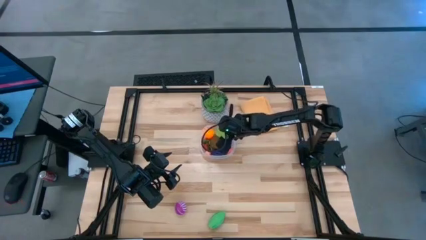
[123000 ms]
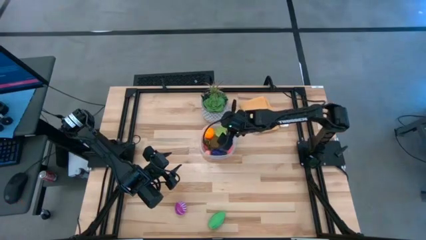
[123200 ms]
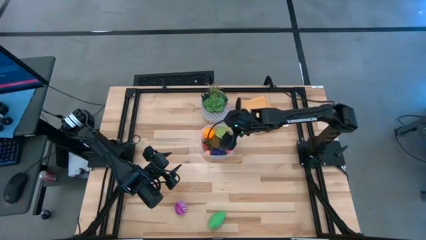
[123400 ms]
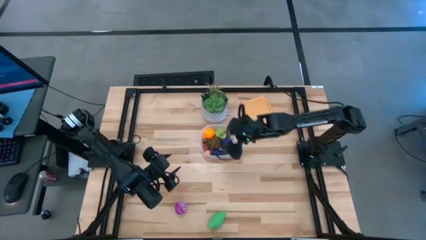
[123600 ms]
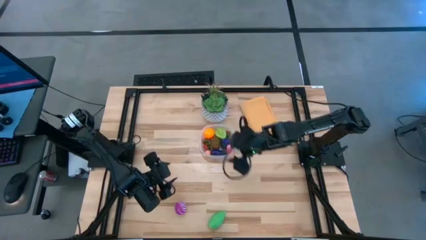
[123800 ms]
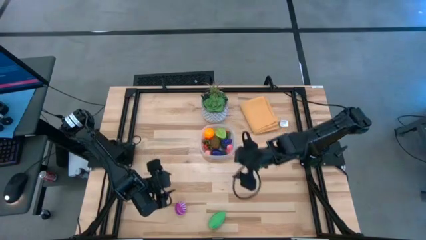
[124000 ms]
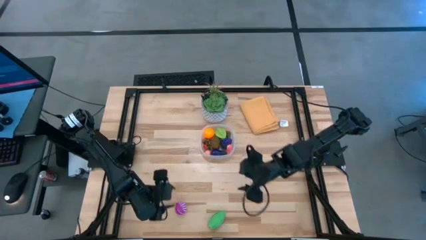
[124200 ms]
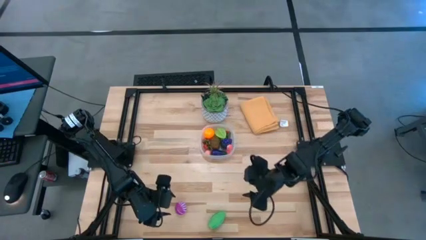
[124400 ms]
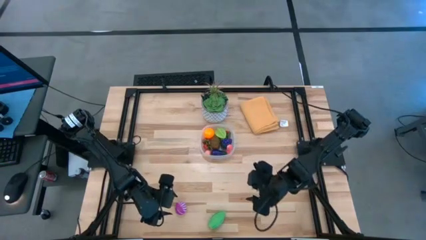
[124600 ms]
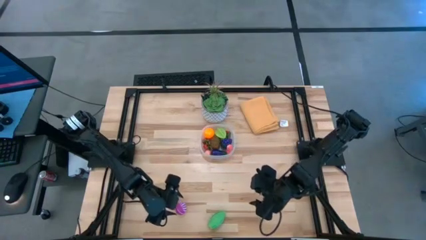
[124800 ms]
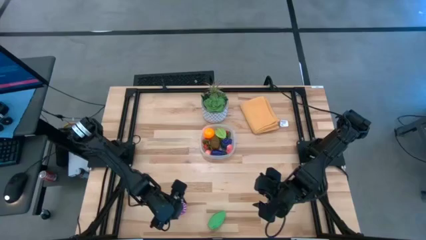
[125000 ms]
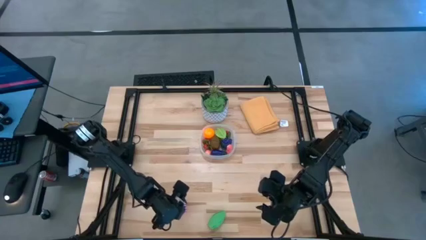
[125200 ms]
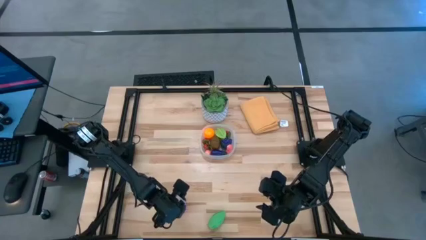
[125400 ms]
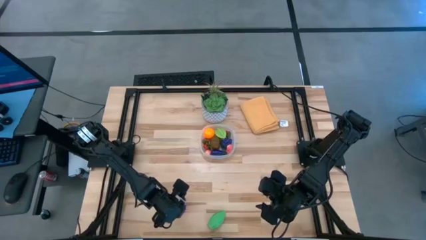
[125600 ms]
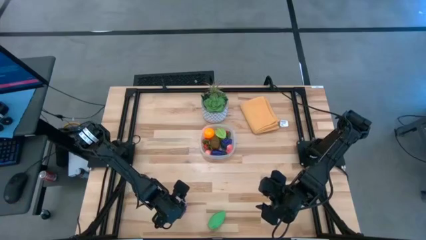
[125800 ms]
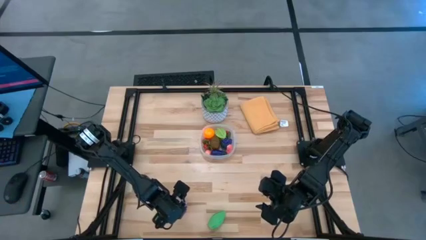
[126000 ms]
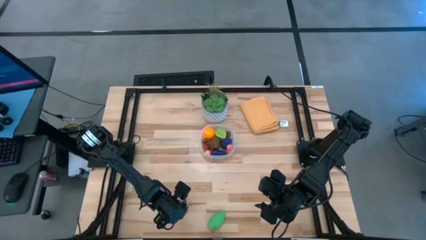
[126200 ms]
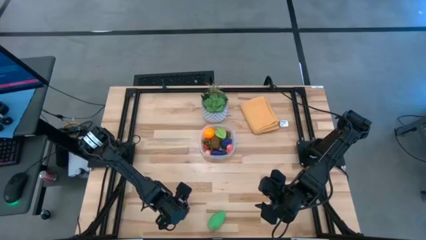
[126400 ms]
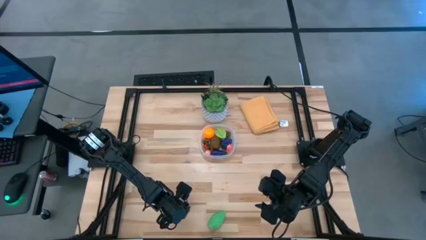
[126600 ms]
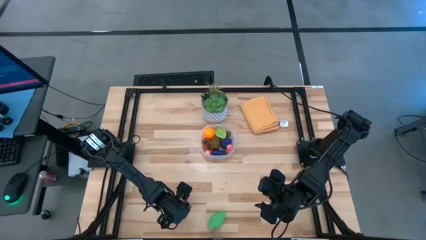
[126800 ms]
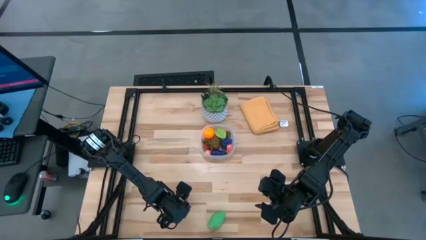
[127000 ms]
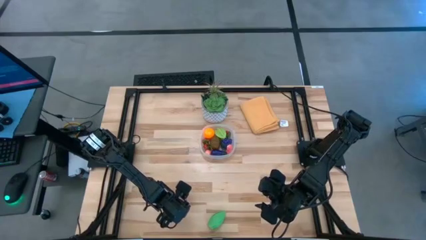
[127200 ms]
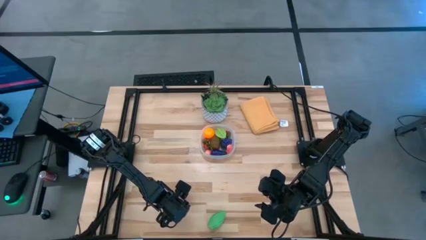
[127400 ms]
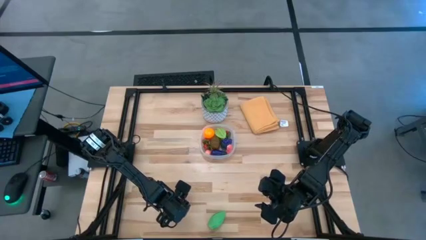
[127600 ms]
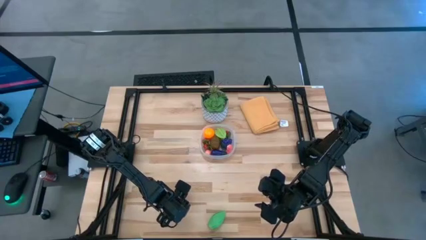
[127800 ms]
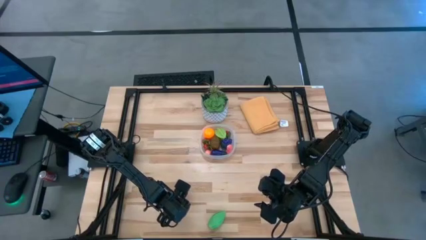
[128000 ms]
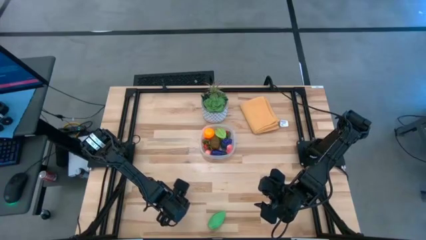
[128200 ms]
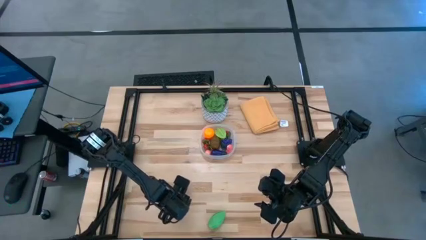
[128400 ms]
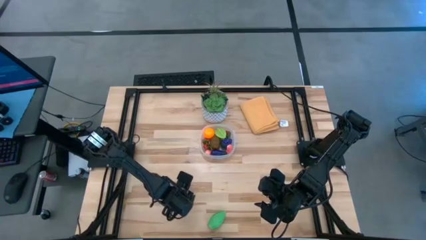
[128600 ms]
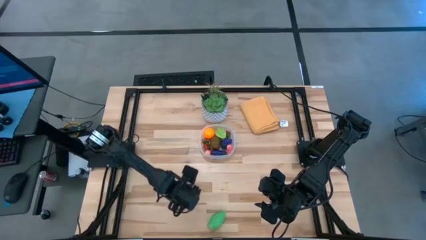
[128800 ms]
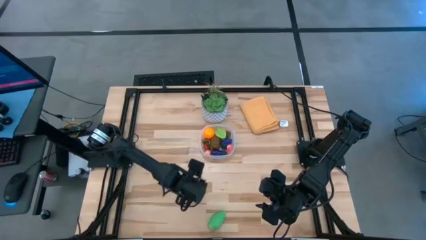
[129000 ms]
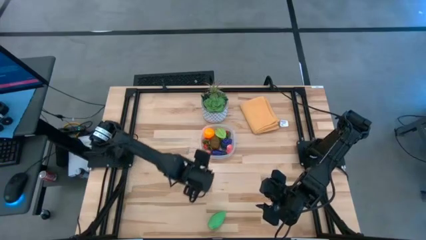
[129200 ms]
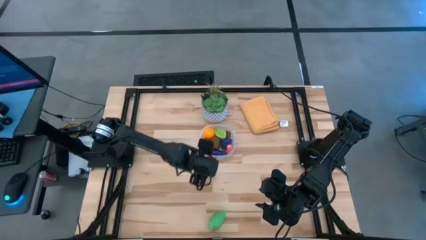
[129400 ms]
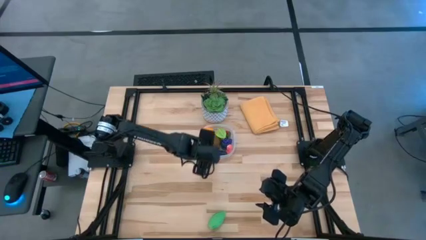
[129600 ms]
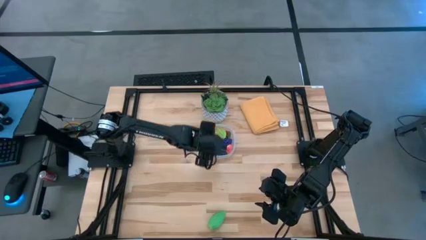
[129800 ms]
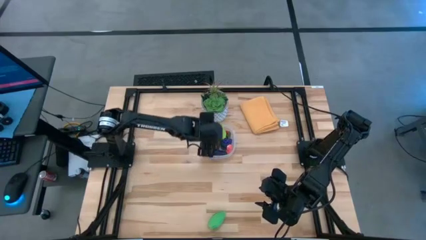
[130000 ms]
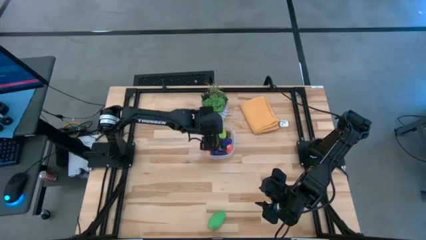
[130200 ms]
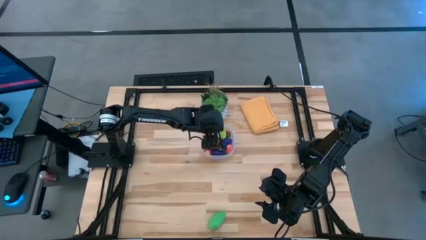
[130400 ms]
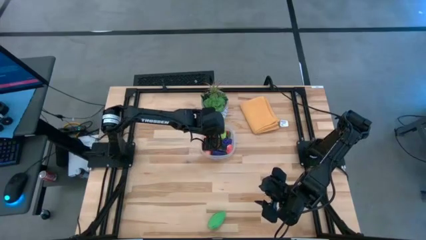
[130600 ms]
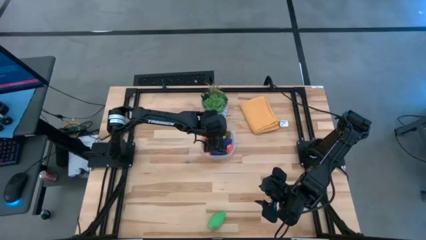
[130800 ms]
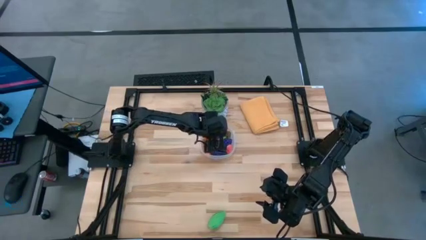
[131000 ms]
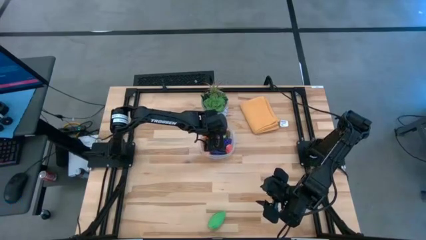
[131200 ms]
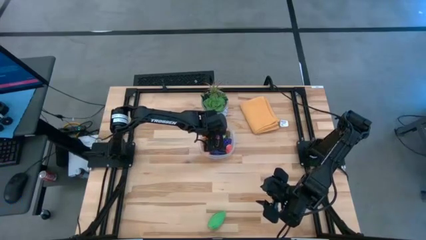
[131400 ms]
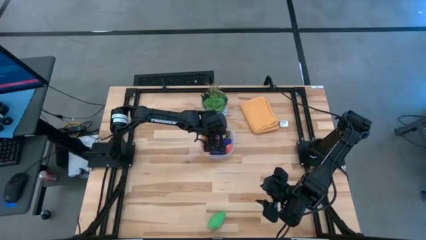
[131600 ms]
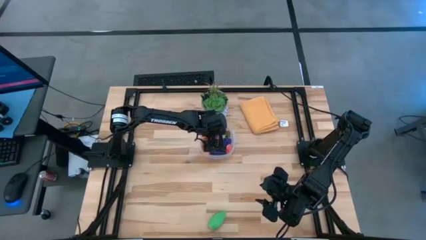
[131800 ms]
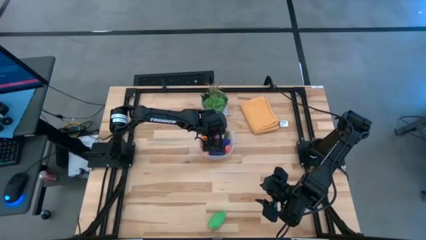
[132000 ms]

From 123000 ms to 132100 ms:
Task: Pick and placing Produce into tupperware
Put the purple onion into the transparent bin
